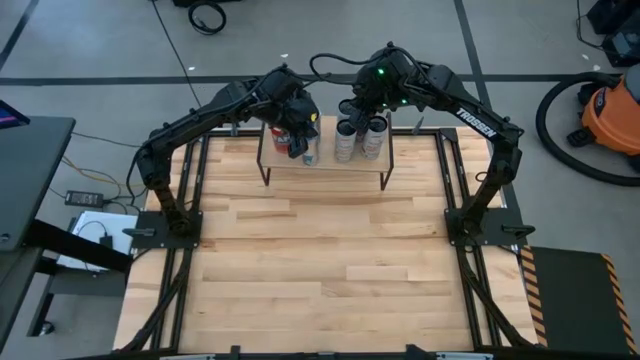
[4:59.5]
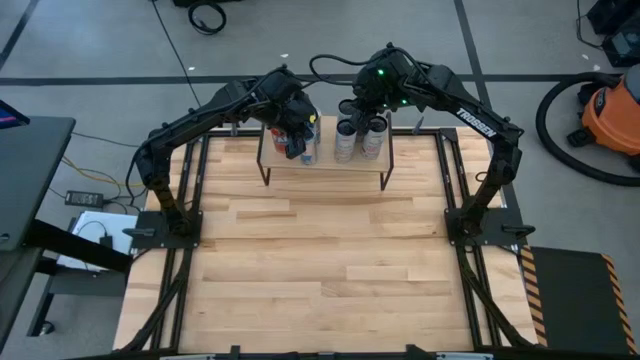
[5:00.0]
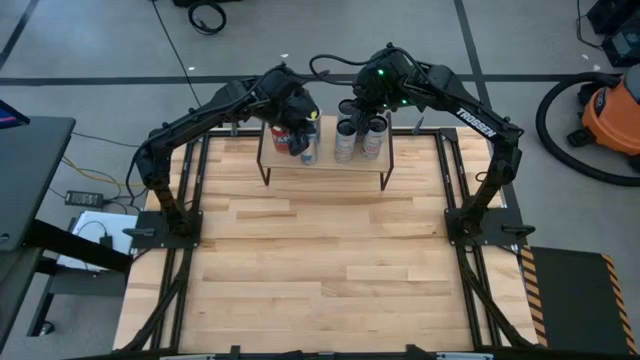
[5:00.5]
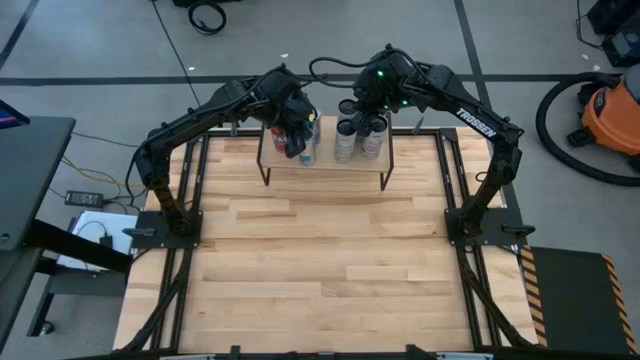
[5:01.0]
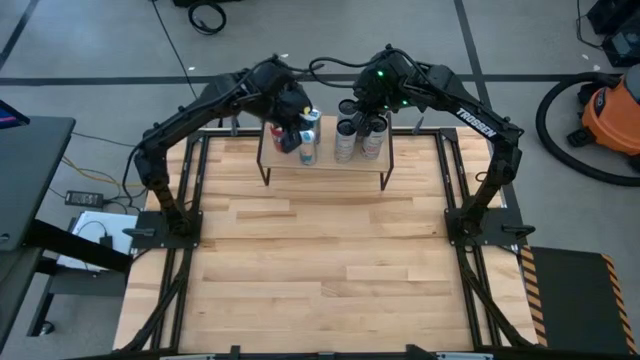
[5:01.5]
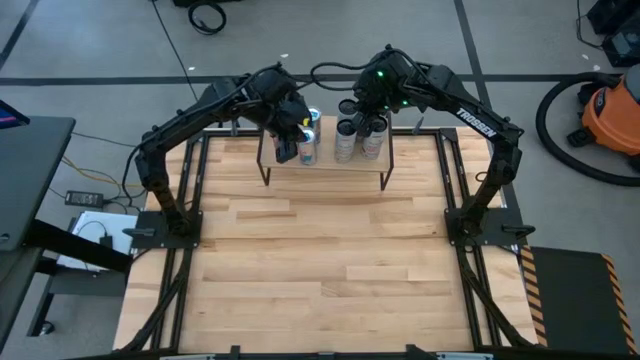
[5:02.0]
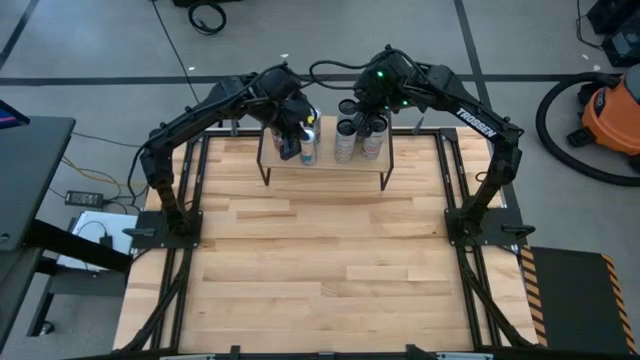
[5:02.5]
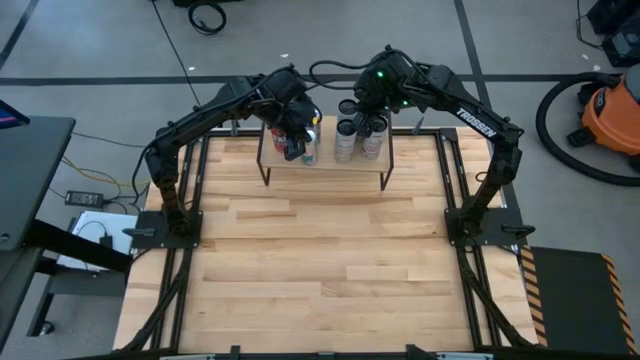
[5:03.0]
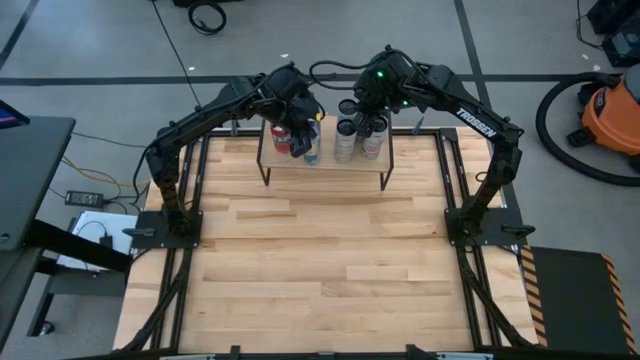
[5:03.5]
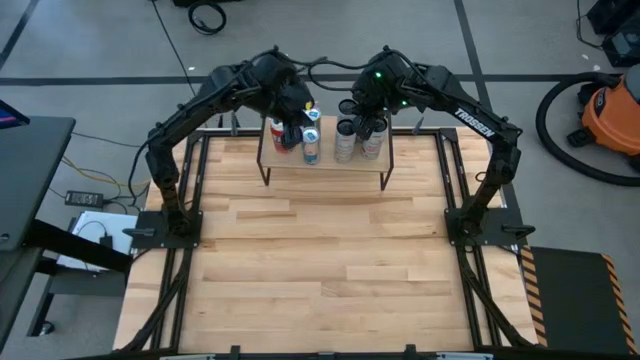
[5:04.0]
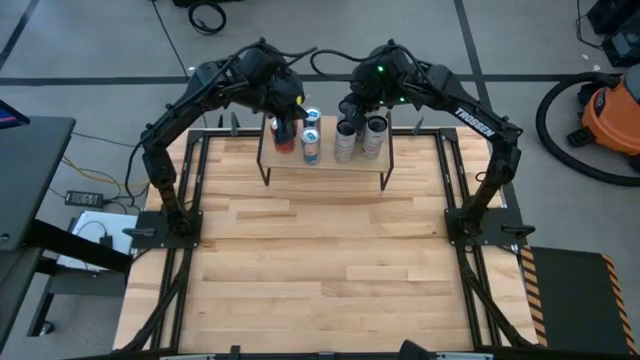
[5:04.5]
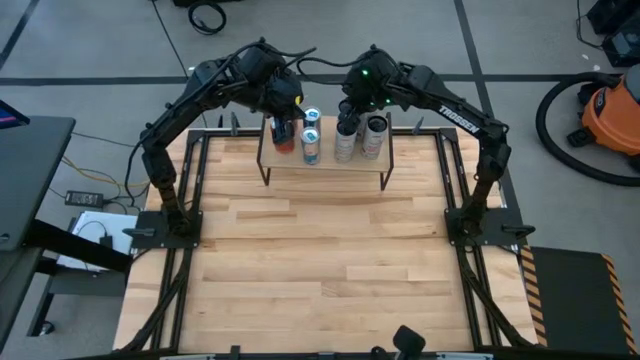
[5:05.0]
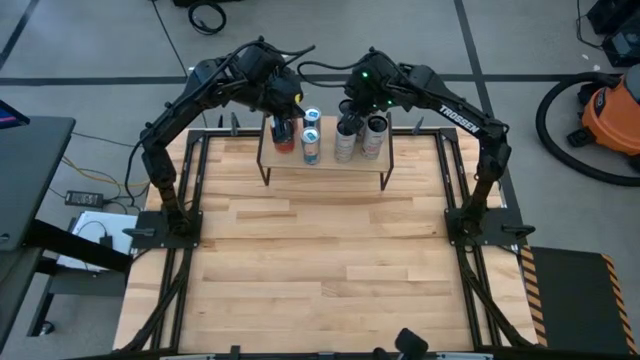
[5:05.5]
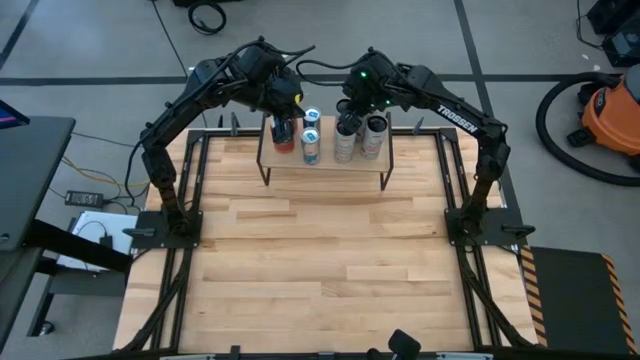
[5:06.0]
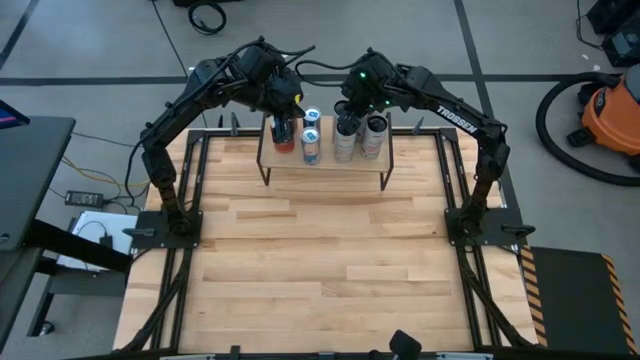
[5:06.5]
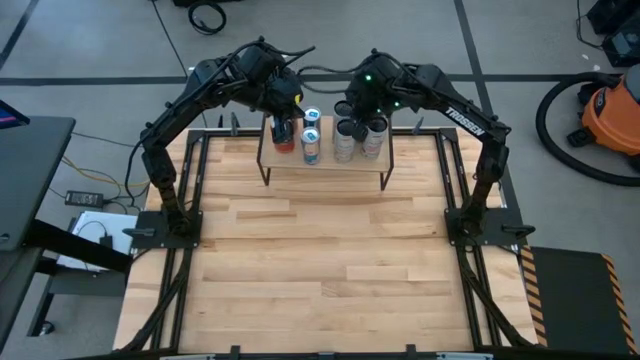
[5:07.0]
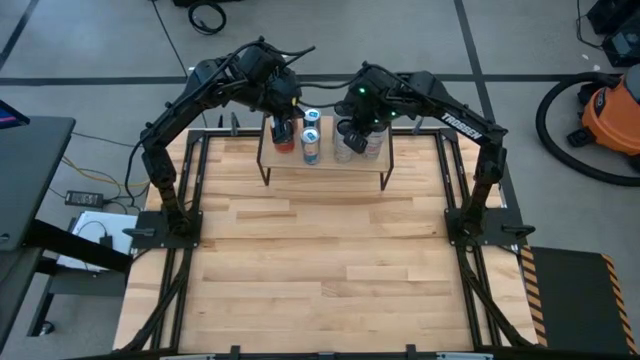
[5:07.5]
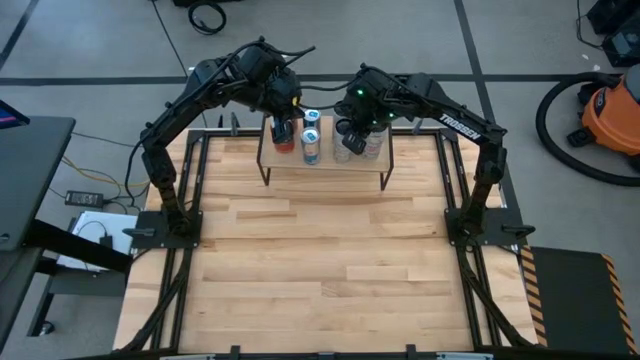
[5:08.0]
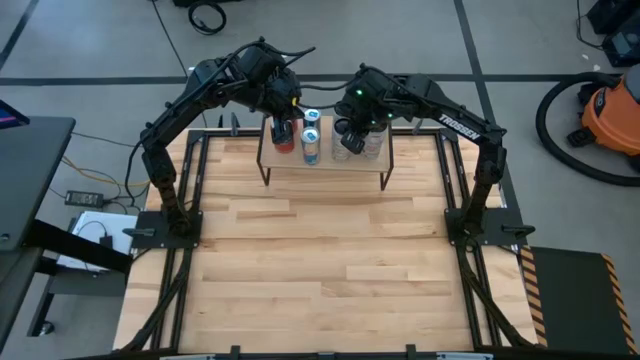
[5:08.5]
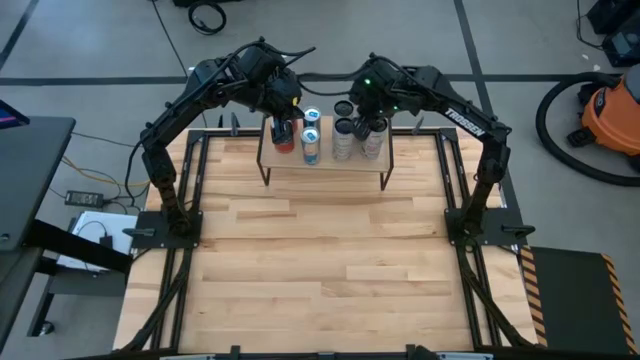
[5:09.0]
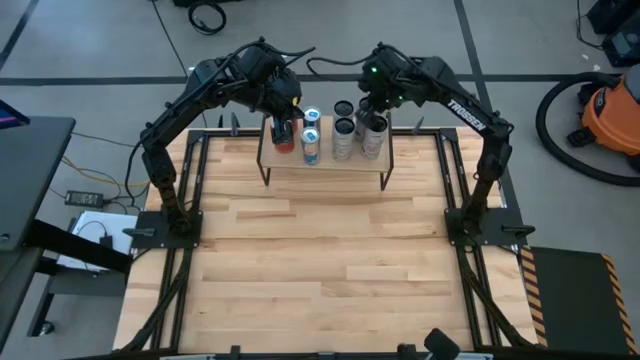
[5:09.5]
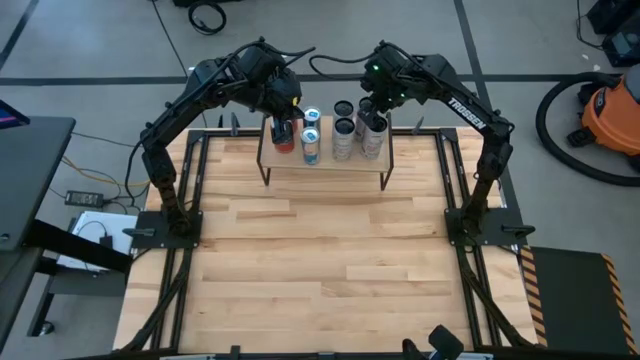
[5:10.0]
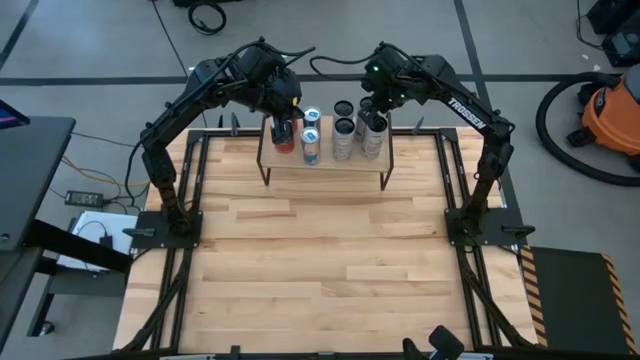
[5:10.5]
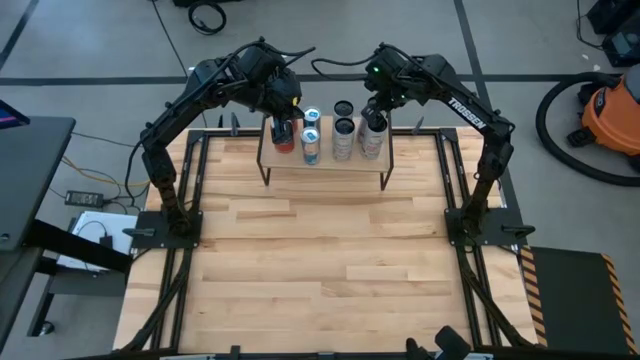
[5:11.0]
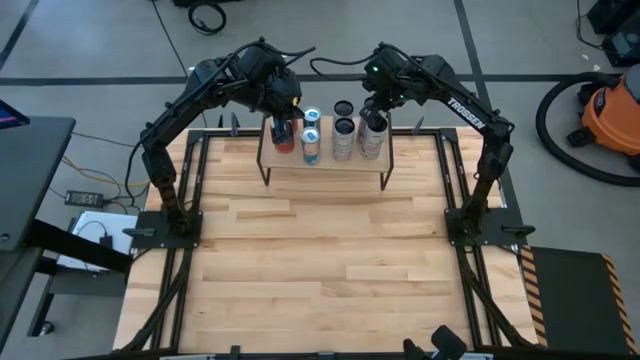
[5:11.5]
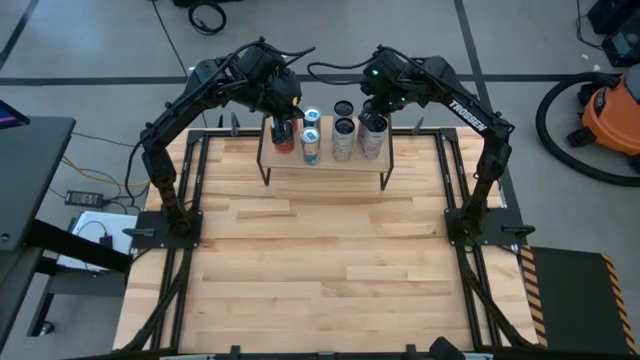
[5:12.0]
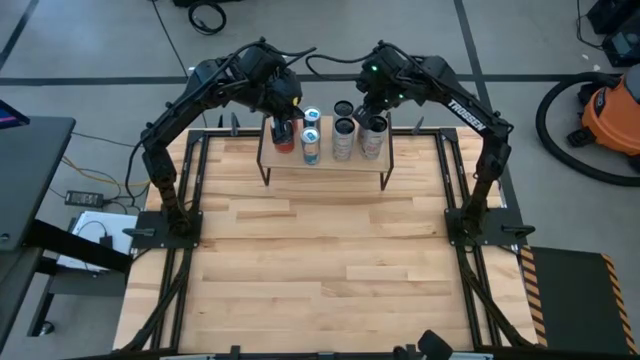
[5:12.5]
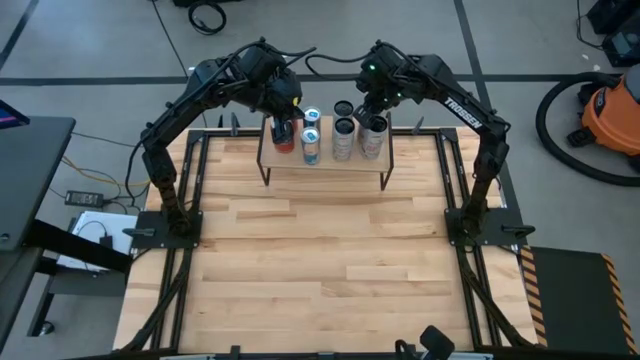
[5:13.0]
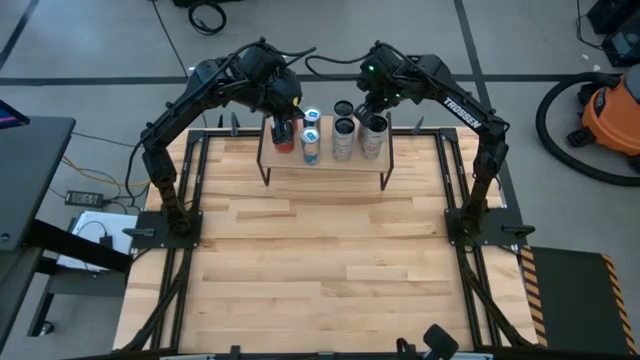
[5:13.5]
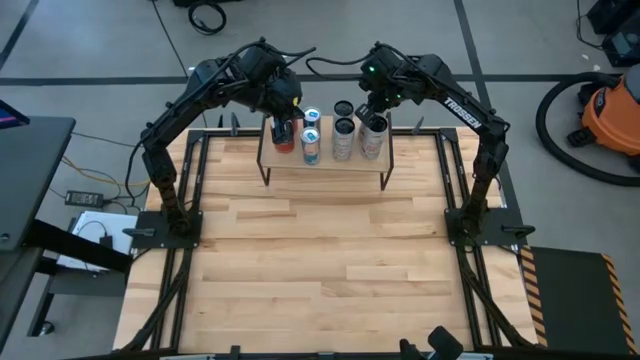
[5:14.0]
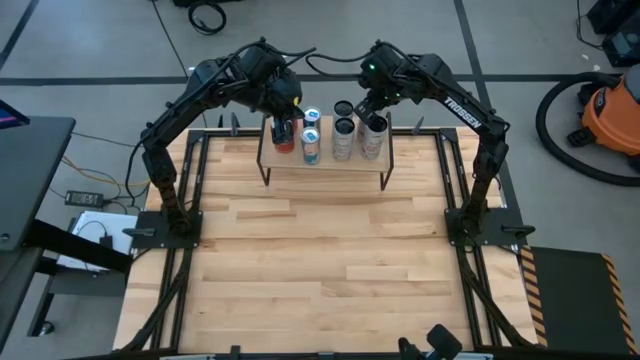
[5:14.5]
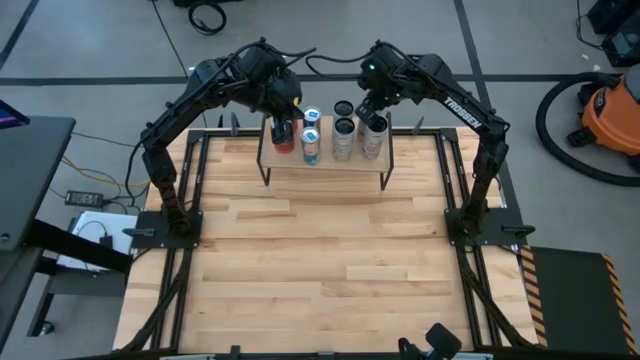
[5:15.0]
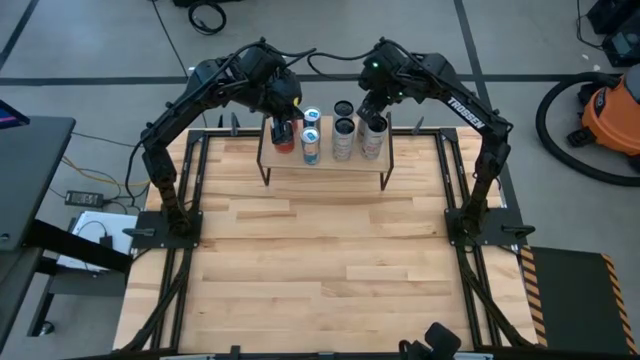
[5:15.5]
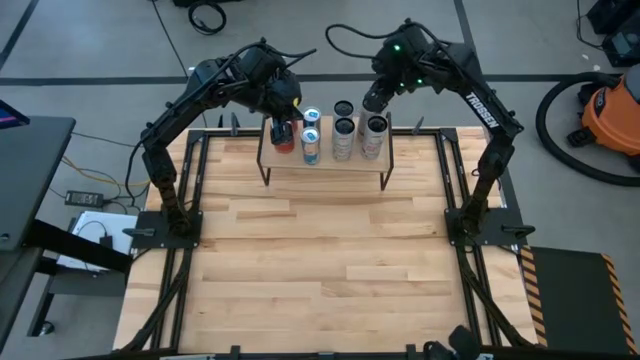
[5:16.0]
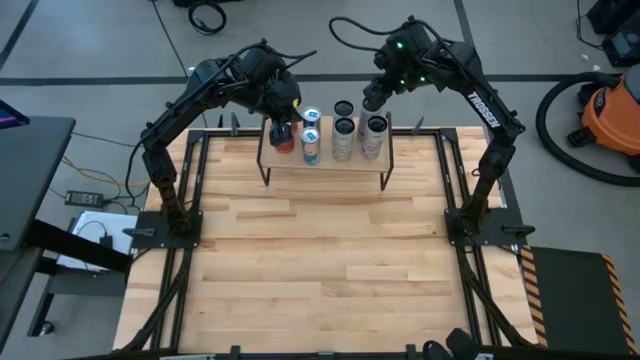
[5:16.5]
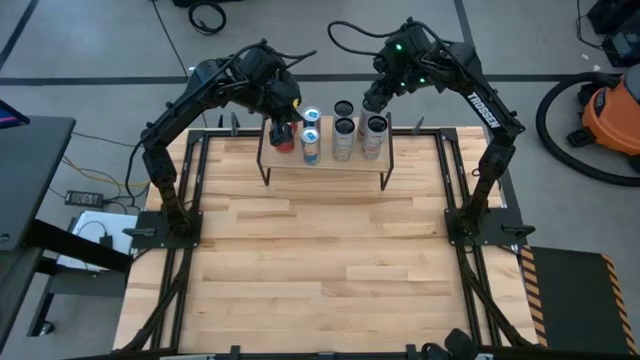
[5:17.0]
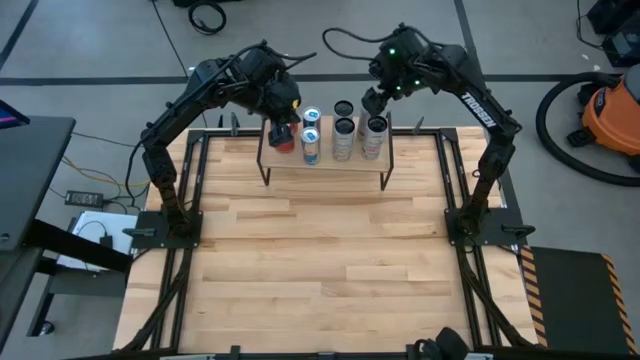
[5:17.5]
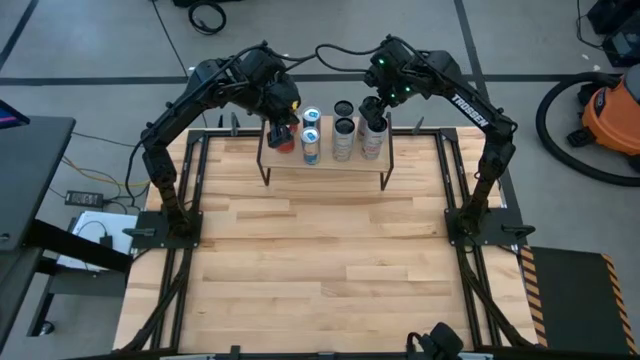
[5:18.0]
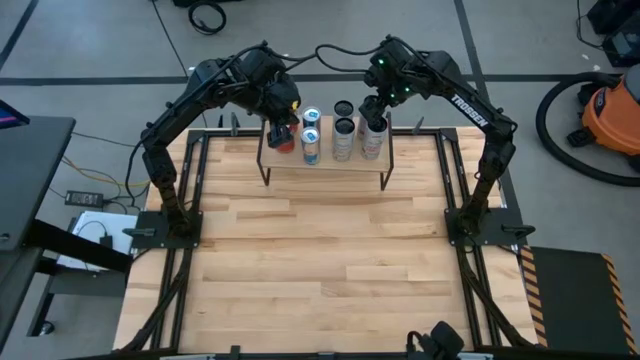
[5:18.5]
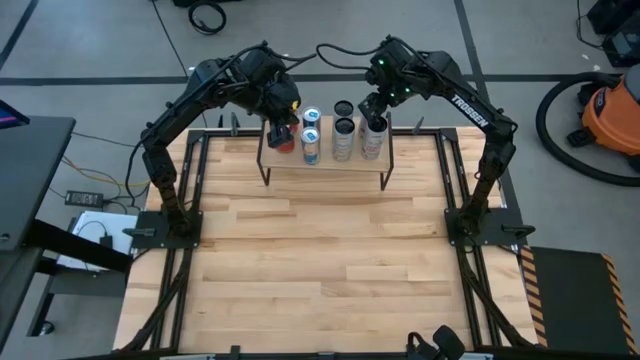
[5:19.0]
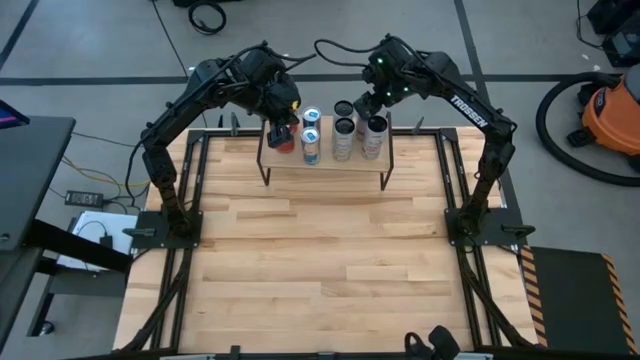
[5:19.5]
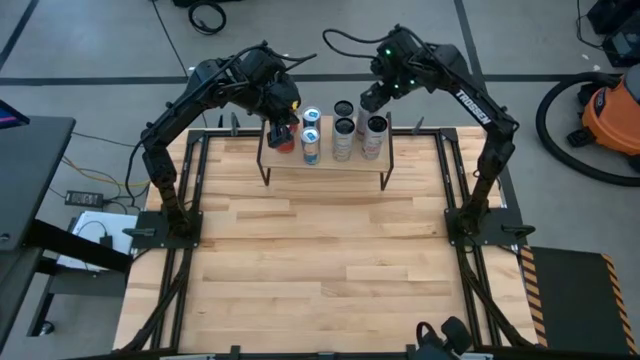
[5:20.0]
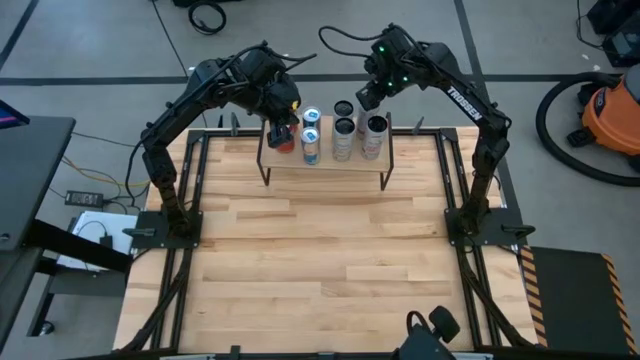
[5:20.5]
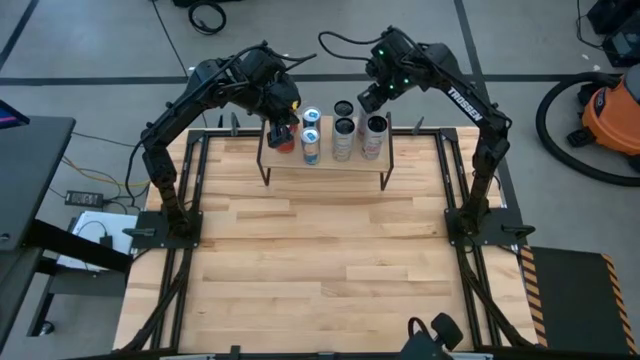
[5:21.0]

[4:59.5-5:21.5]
Task: Place canned beverage on shelf
Adjust the soda cans on the shelf
